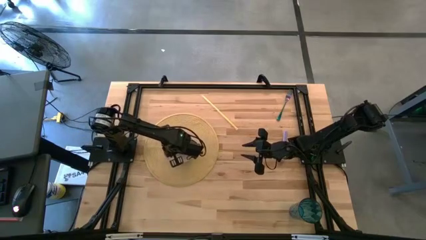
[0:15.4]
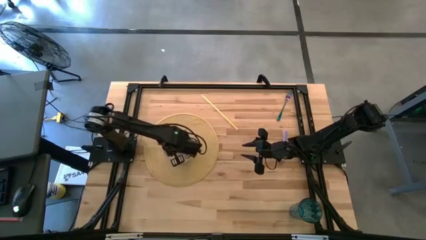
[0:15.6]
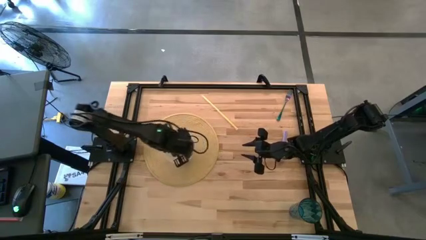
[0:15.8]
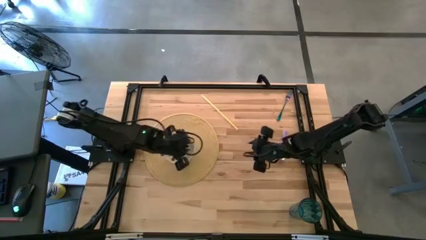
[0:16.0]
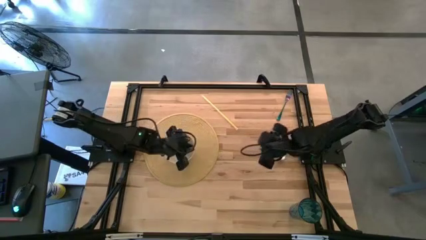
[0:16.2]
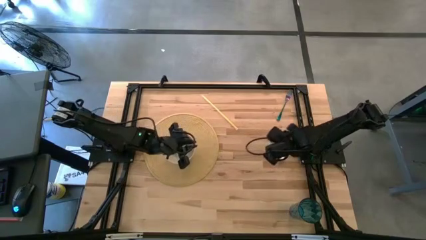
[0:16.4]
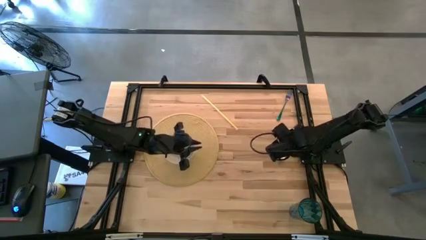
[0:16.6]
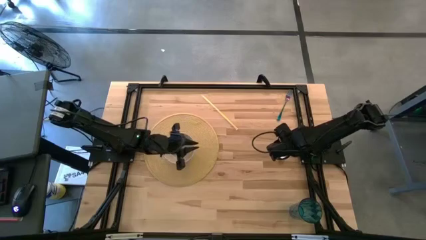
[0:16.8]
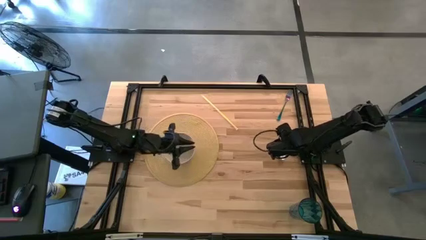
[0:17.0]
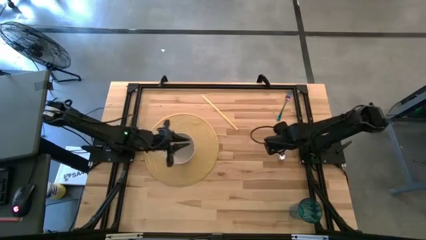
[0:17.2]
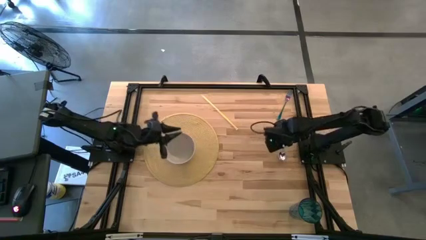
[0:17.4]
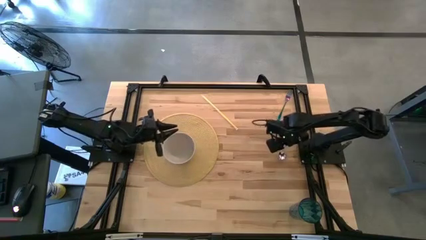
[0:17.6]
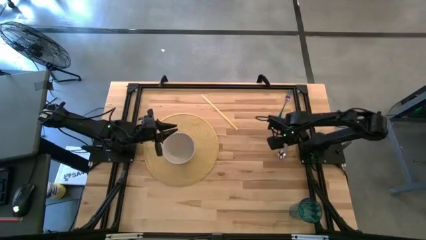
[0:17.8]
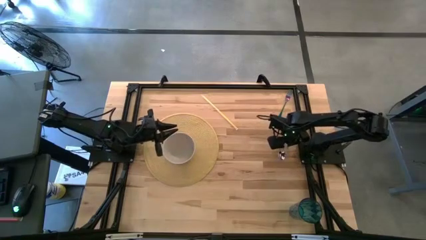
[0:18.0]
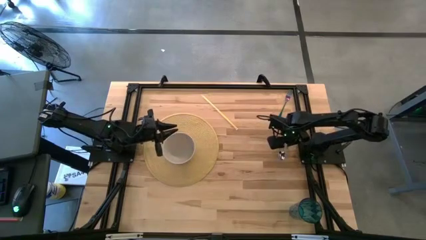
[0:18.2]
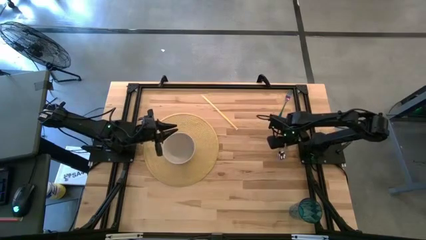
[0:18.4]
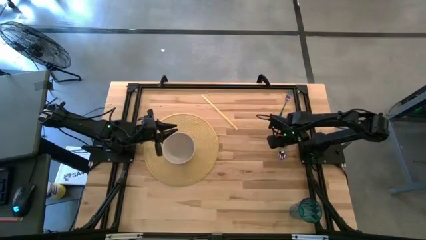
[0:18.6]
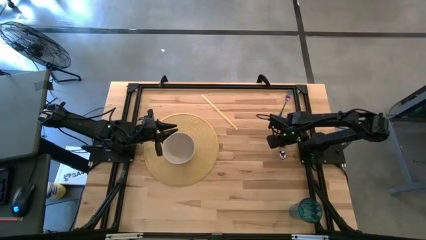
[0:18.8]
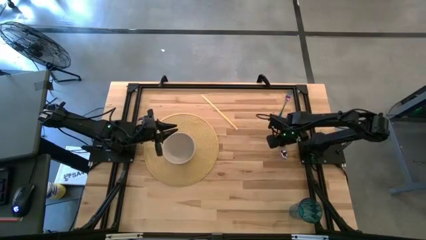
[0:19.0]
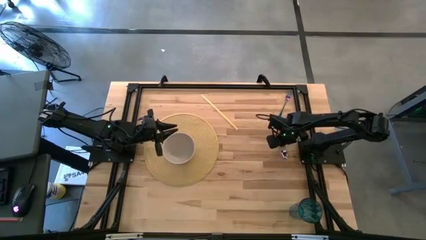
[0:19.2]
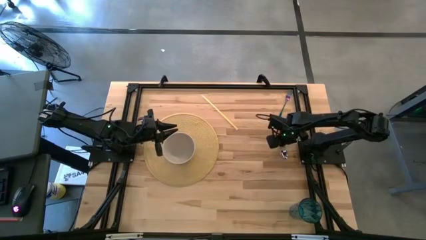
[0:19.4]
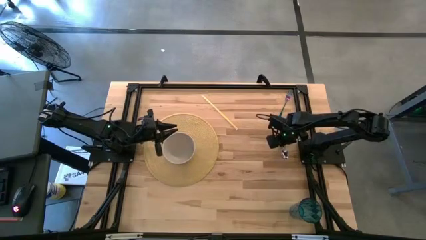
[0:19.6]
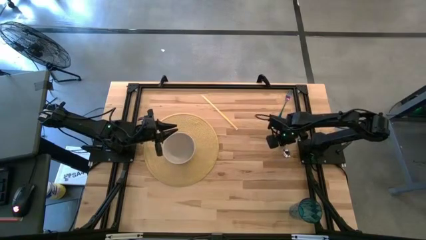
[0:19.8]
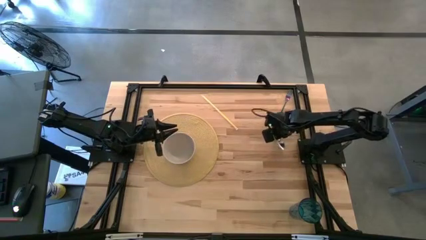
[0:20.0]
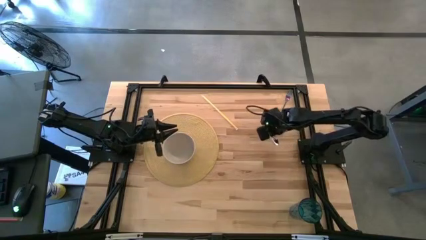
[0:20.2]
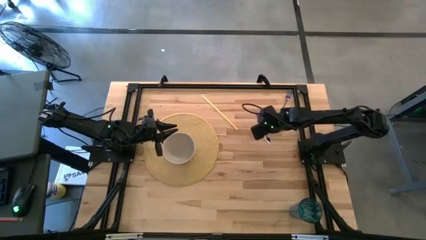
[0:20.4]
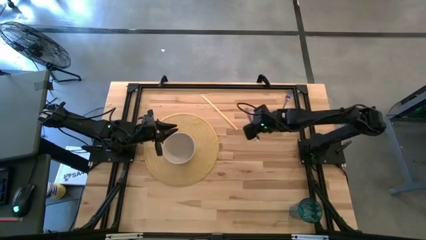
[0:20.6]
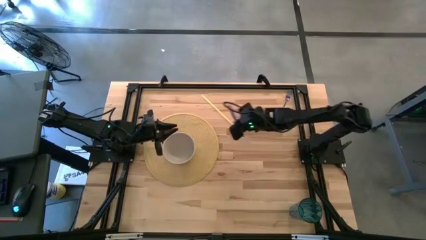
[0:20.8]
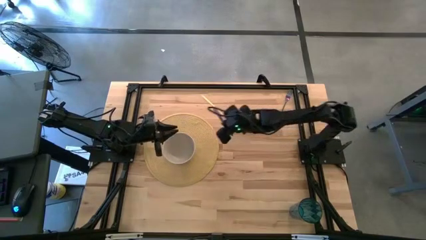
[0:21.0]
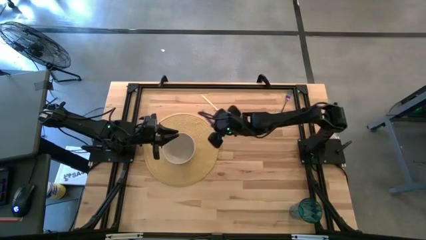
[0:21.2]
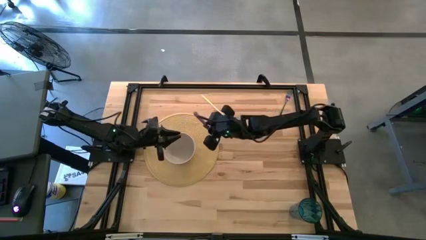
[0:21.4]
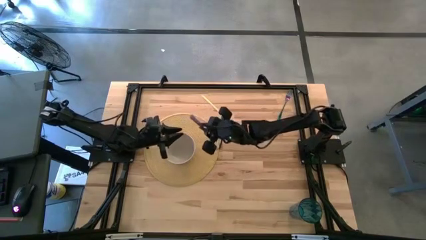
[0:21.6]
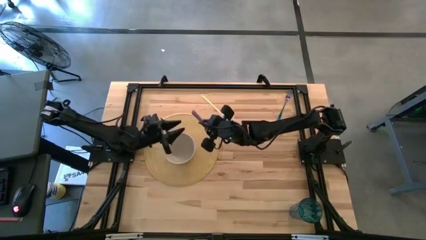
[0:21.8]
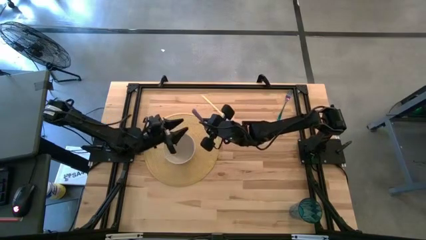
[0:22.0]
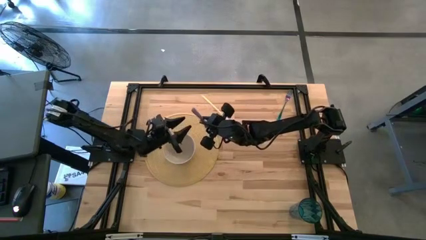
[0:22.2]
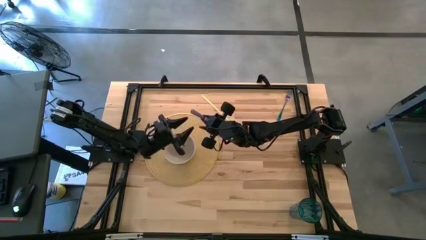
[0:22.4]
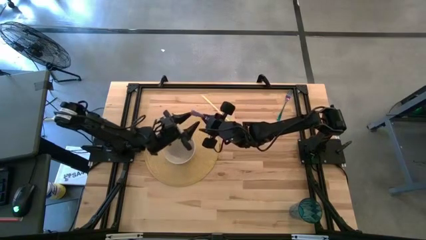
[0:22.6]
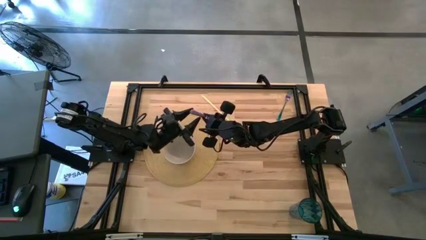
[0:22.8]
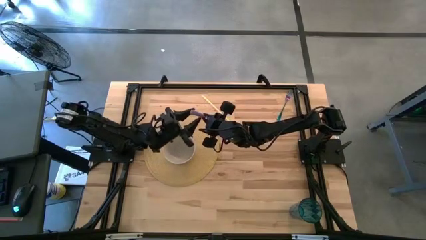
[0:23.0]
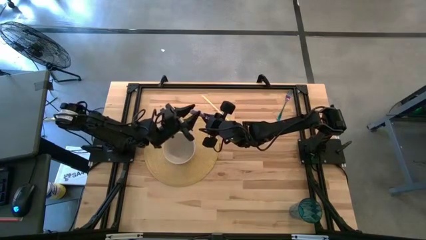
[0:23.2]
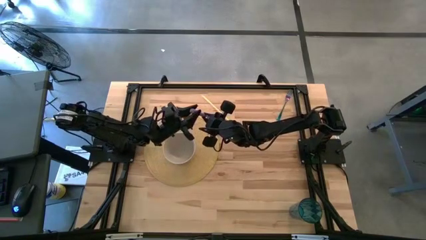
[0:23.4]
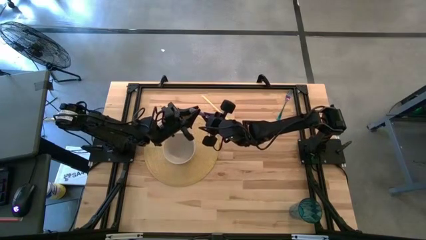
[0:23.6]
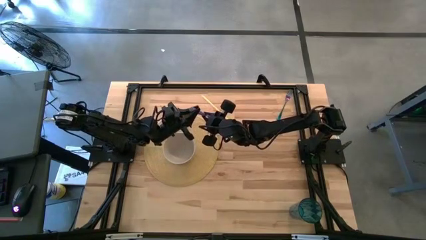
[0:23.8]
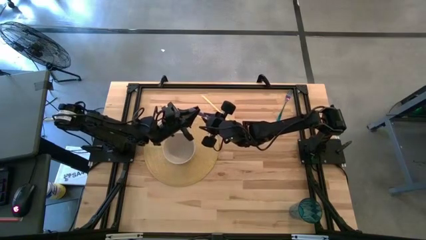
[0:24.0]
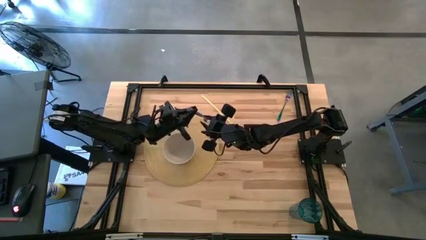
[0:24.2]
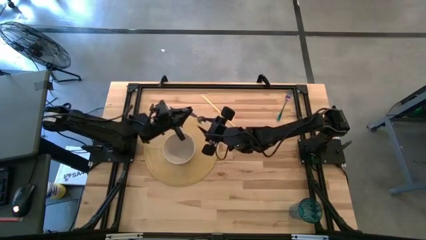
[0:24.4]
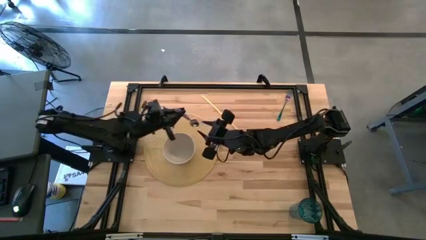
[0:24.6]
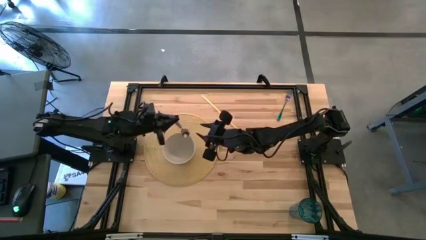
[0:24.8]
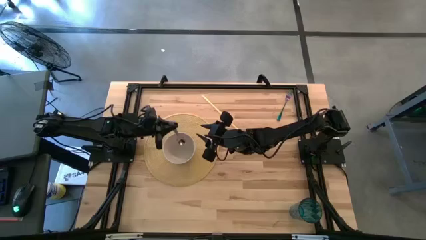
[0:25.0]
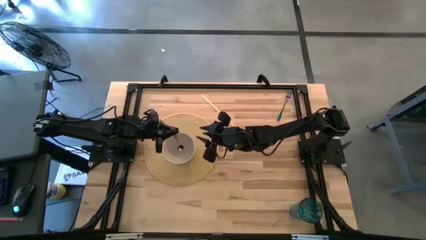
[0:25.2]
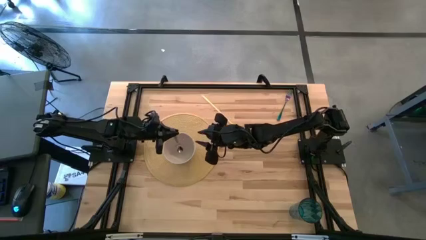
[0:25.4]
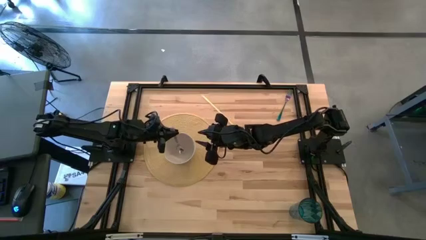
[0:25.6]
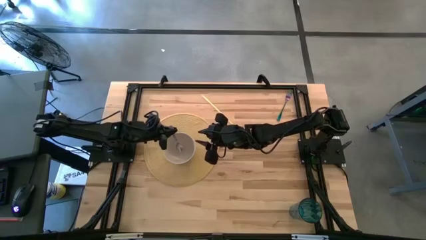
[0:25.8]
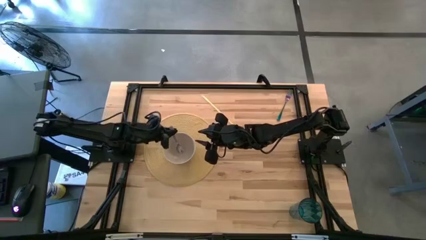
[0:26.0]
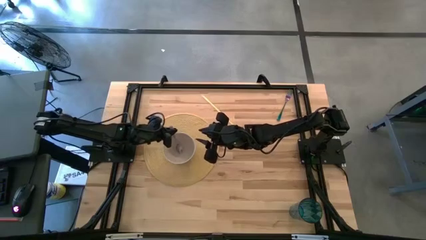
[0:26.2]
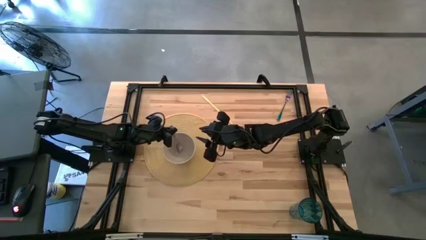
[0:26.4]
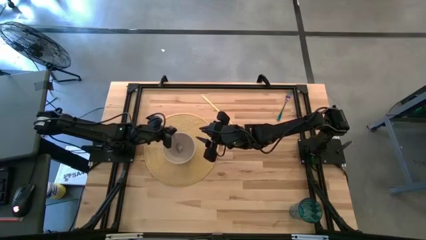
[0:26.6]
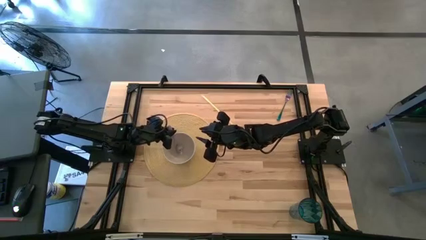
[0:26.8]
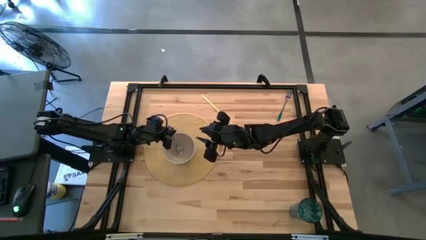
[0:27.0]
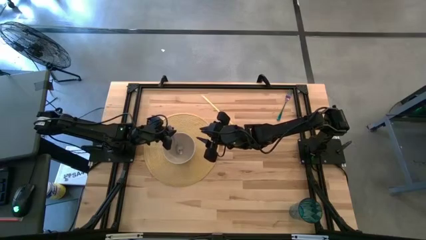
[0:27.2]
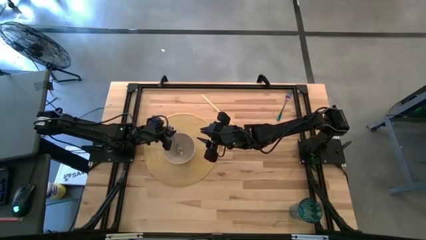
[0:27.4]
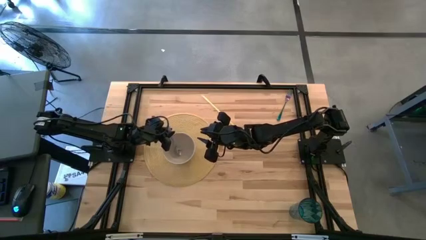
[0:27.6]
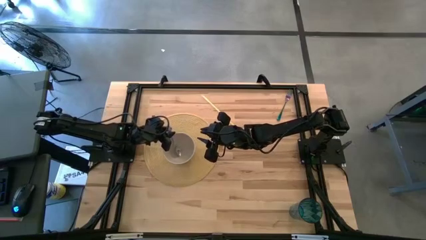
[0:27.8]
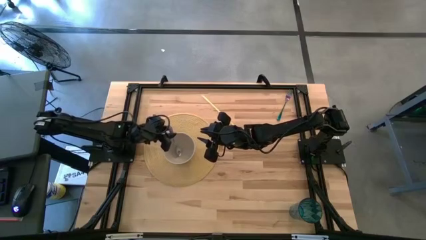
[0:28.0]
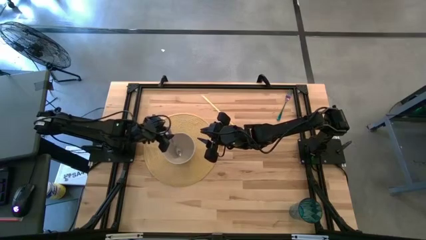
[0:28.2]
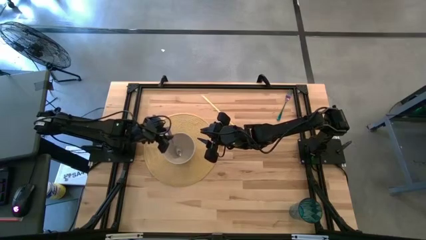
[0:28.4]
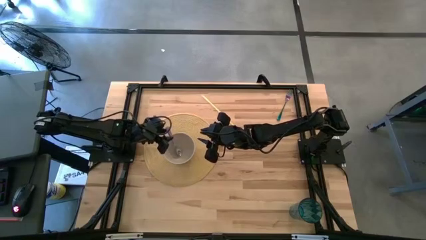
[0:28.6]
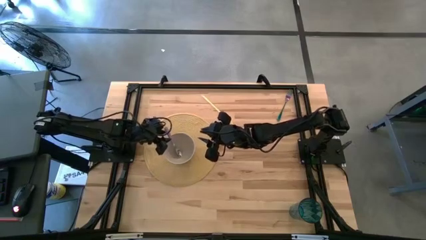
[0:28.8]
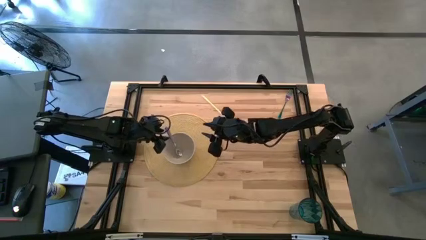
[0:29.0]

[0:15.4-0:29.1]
Task: Pick & Place Utensil
Put the violet spoon into the white bowl

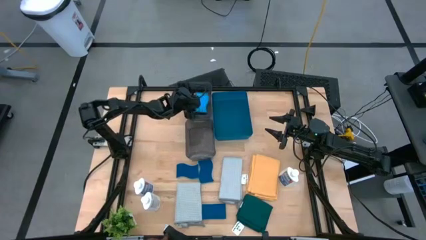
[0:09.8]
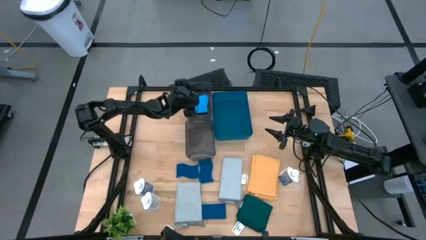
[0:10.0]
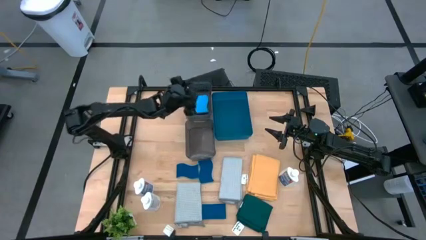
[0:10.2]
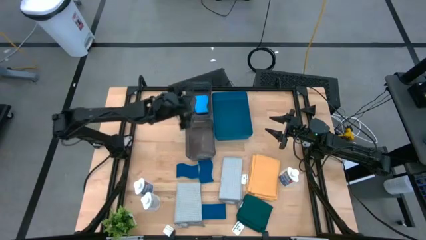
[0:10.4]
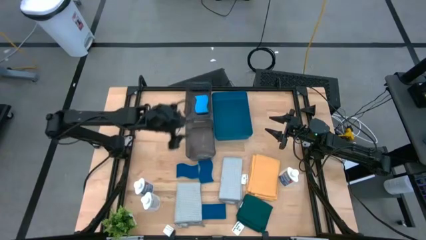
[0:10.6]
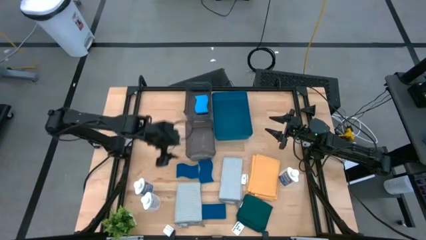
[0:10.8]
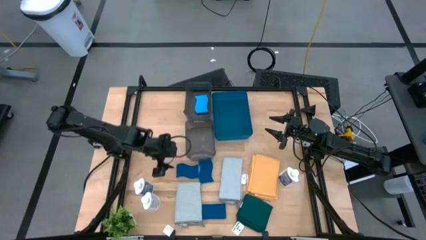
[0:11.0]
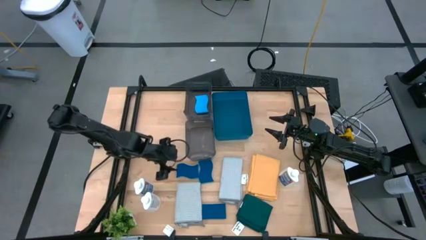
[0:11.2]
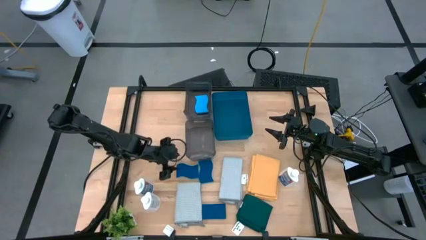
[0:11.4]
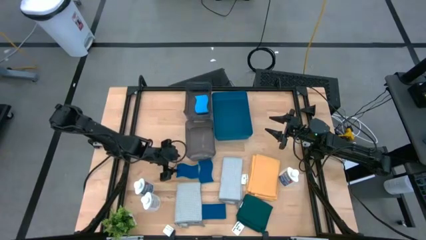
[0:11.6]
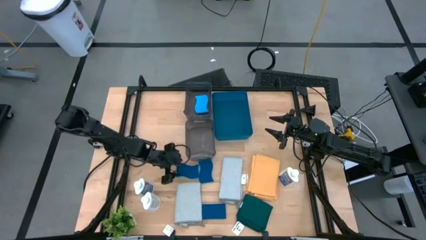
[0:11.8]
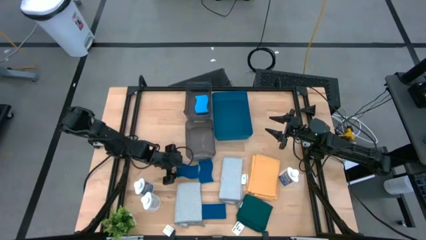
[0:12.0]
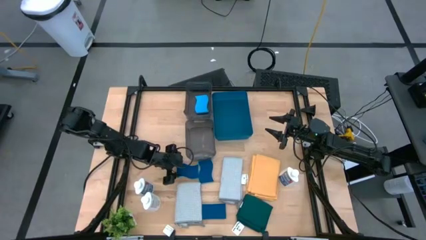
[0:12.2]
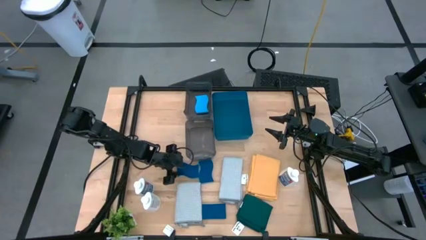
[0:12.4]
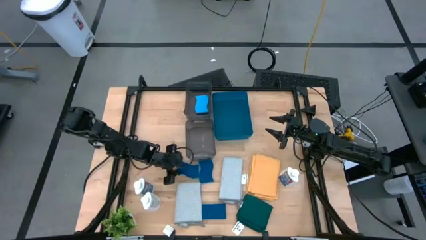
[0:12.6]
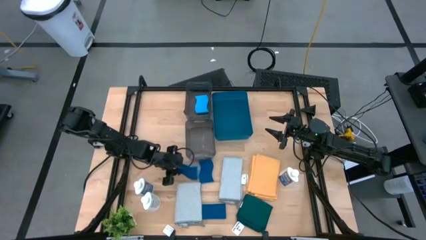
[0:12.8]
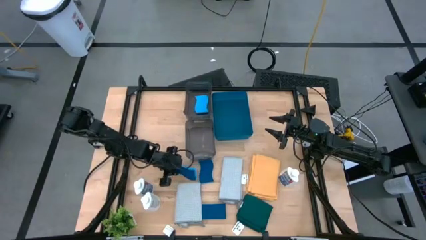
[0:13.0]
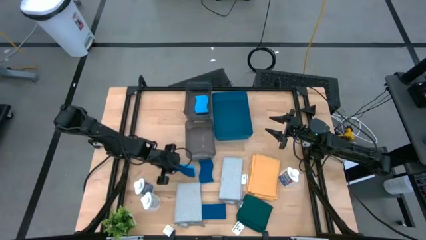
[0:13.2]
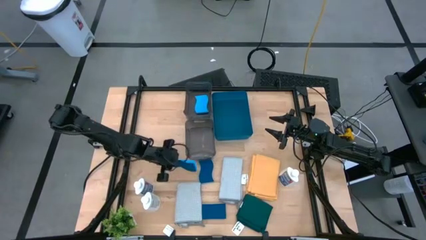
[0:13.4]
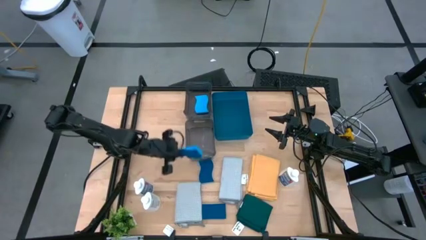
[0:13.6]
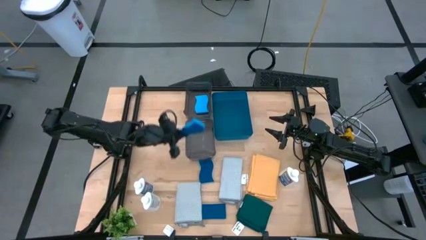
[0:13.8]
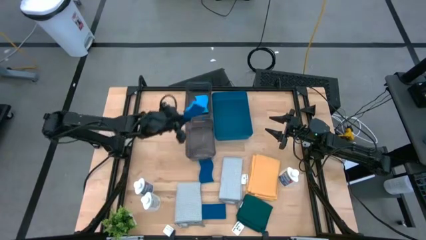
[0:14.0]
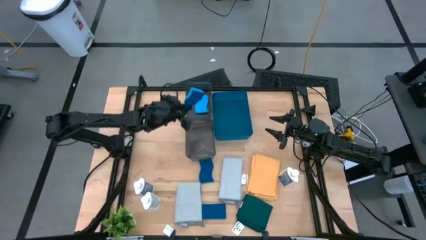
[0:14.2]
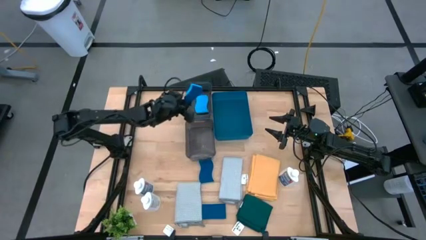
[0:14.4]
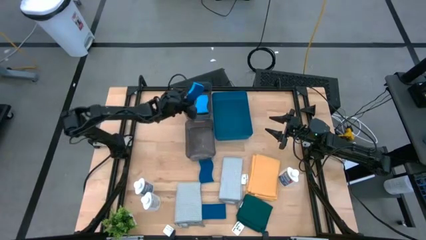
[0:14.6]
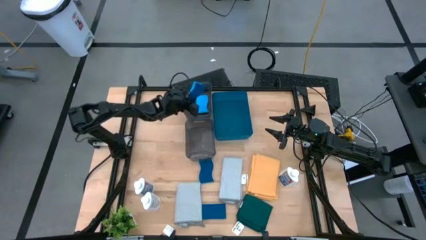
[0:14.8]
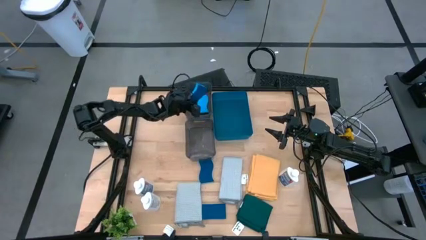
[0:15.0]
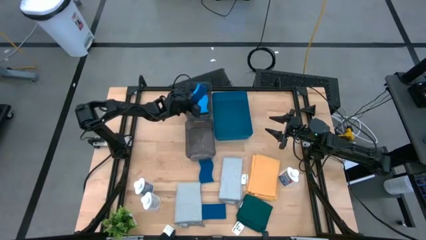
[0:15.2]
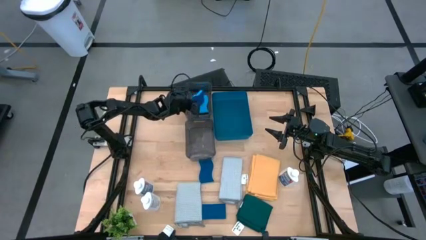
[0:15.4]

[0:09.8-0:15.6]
Task: Pick & Place Kitchen Items
Put the blue sponge into the top black bin
